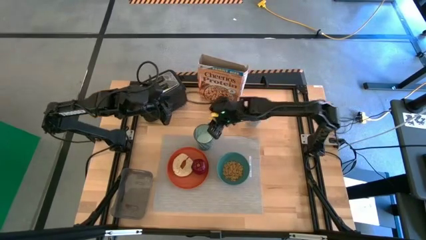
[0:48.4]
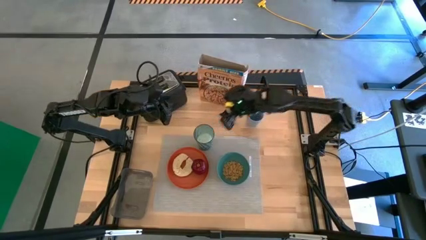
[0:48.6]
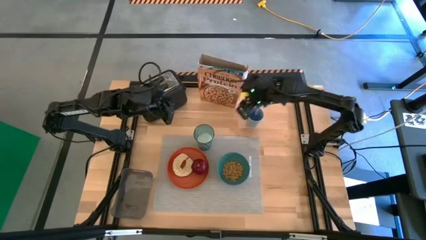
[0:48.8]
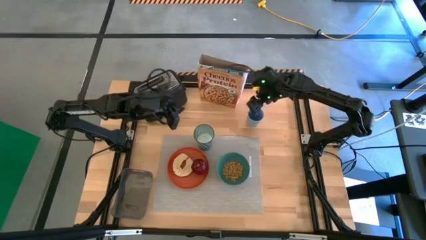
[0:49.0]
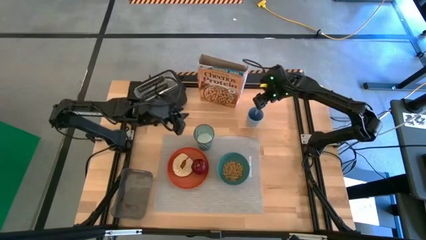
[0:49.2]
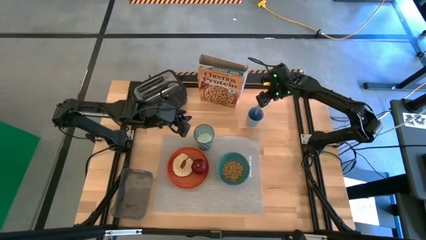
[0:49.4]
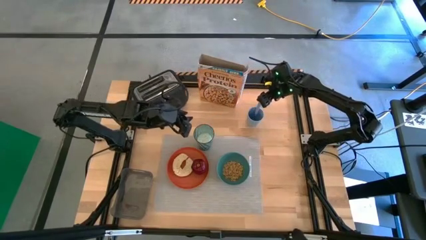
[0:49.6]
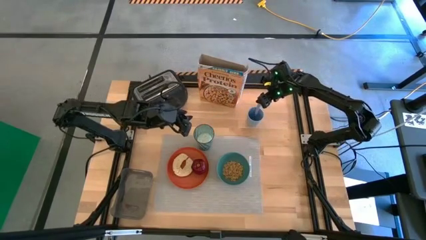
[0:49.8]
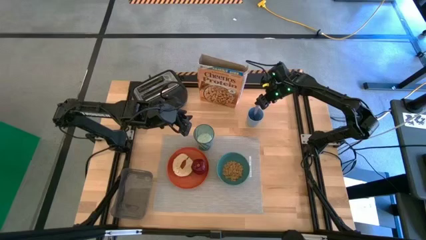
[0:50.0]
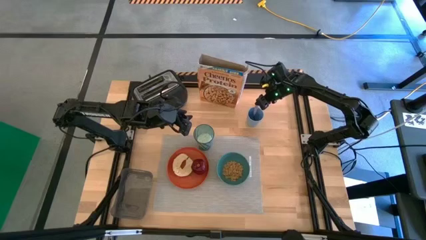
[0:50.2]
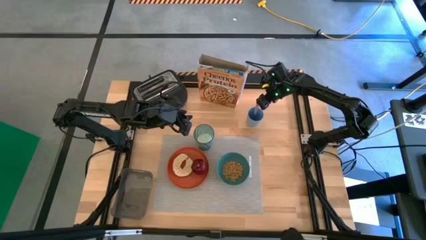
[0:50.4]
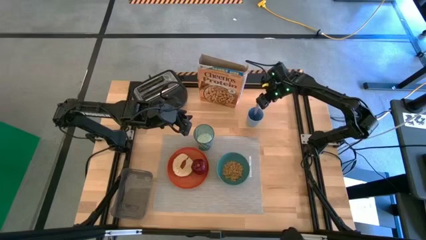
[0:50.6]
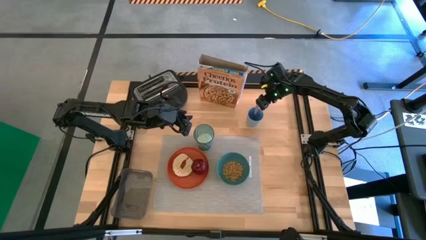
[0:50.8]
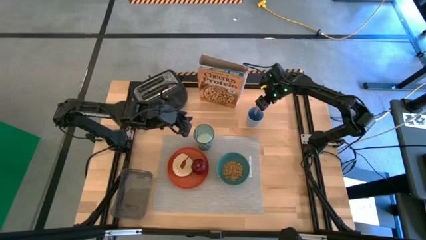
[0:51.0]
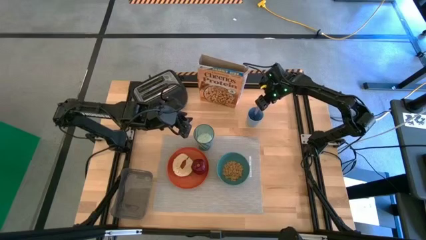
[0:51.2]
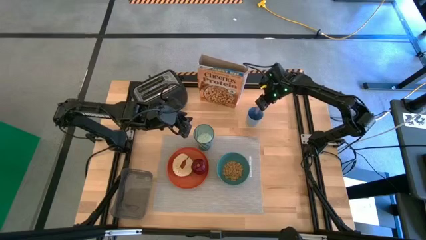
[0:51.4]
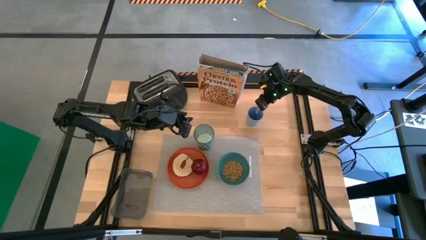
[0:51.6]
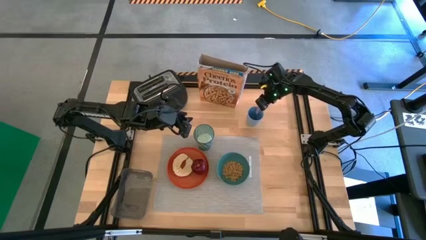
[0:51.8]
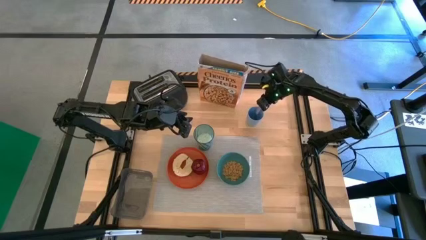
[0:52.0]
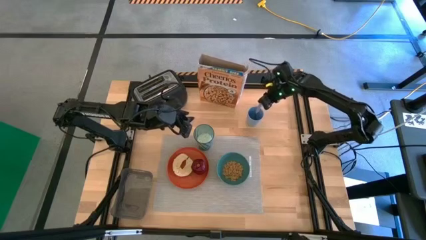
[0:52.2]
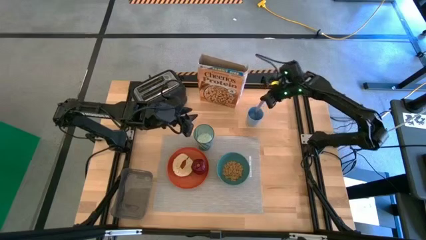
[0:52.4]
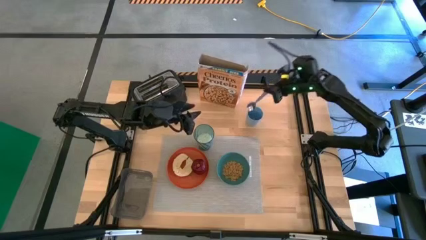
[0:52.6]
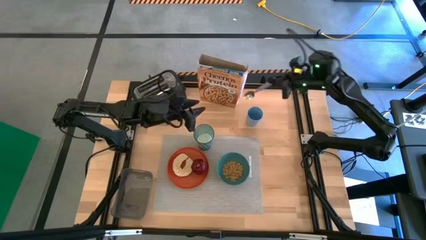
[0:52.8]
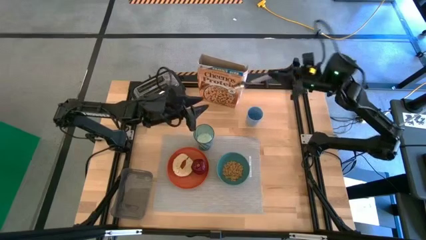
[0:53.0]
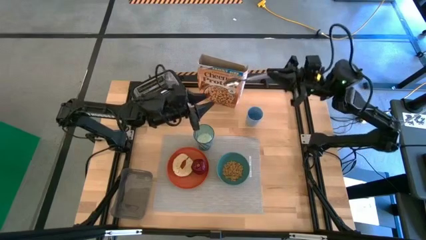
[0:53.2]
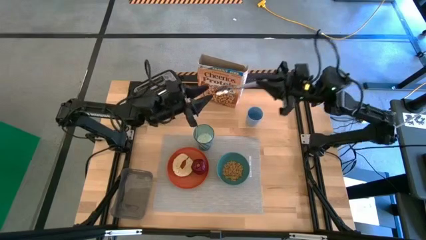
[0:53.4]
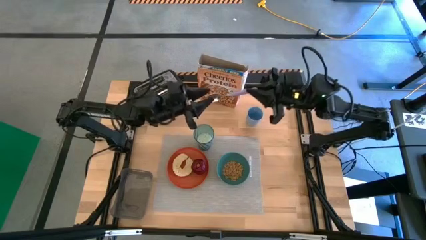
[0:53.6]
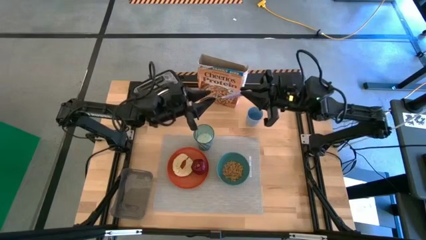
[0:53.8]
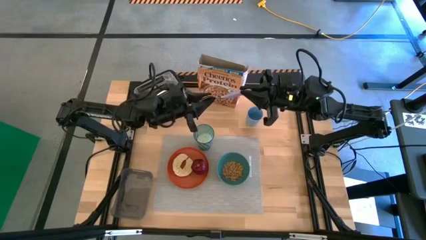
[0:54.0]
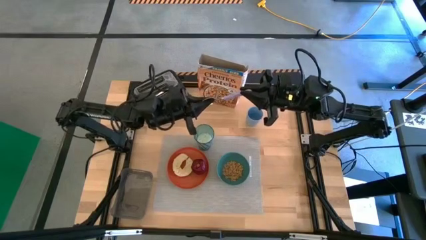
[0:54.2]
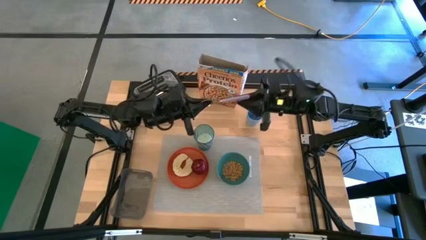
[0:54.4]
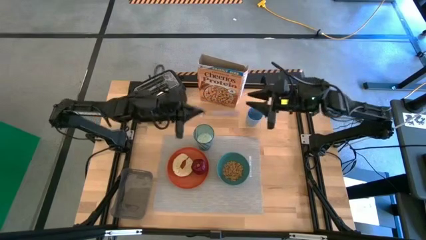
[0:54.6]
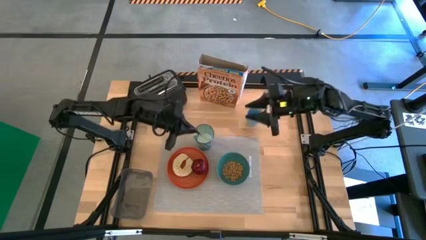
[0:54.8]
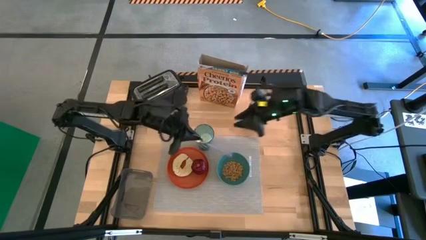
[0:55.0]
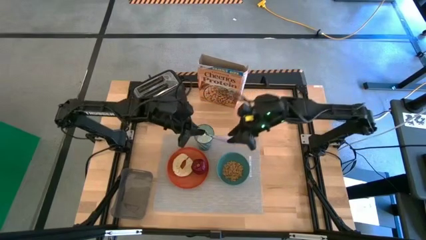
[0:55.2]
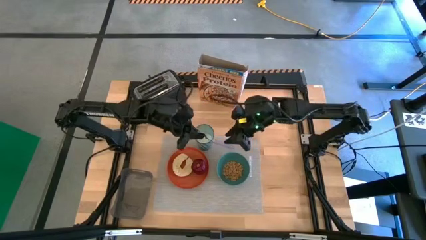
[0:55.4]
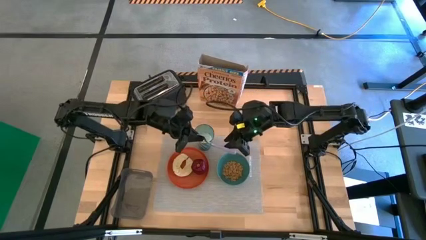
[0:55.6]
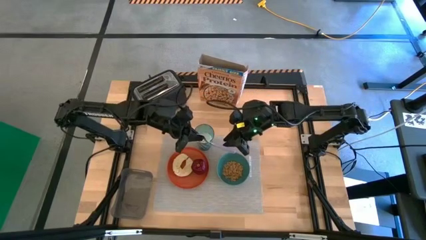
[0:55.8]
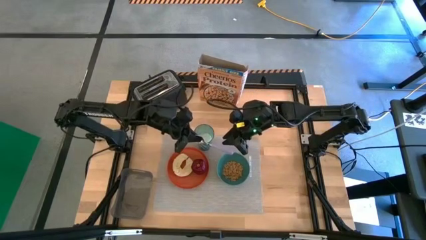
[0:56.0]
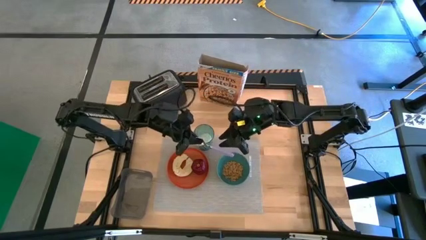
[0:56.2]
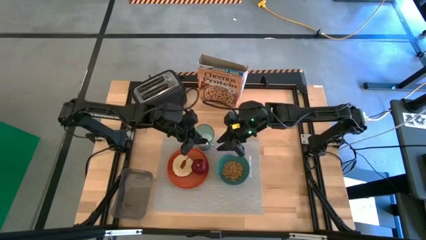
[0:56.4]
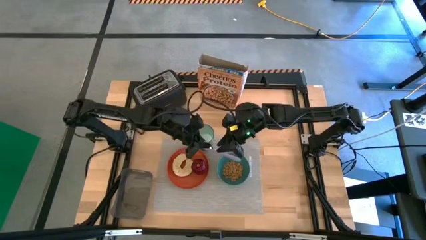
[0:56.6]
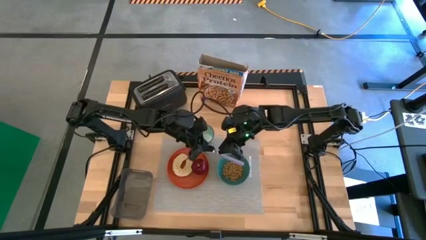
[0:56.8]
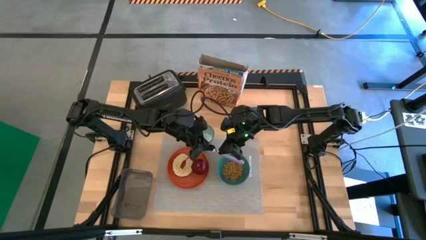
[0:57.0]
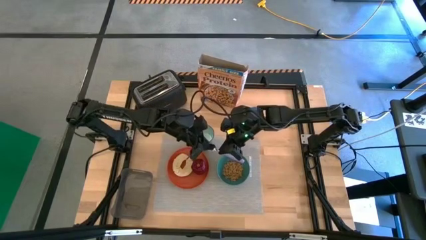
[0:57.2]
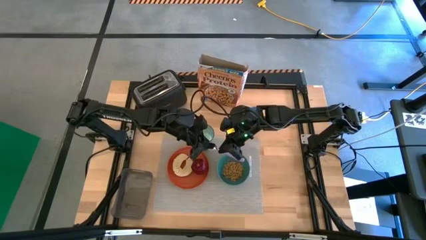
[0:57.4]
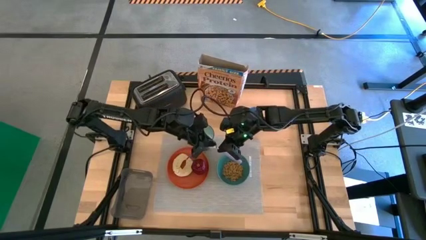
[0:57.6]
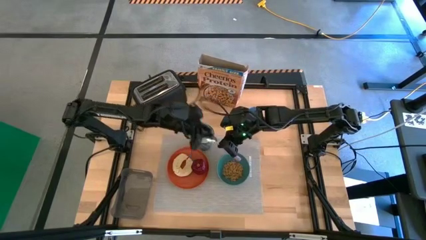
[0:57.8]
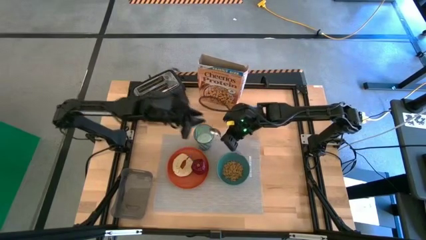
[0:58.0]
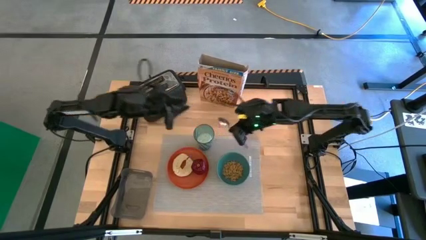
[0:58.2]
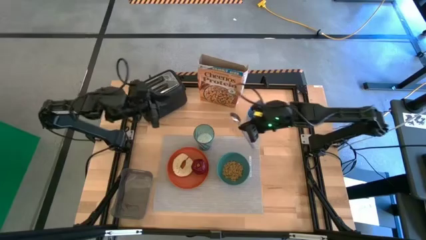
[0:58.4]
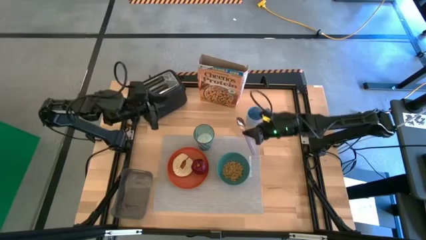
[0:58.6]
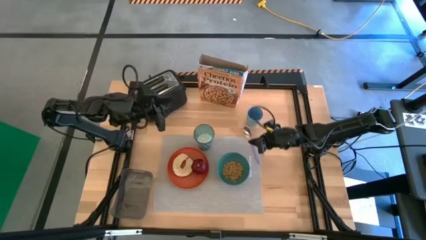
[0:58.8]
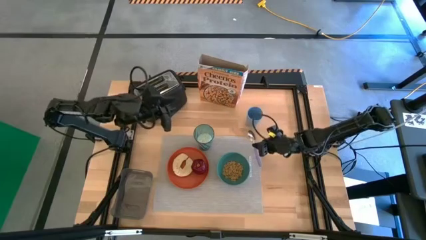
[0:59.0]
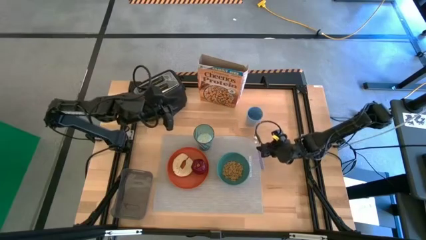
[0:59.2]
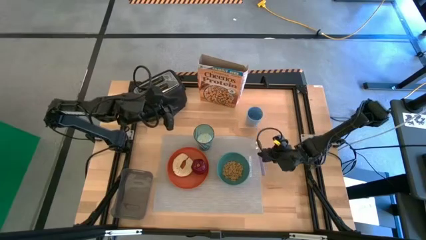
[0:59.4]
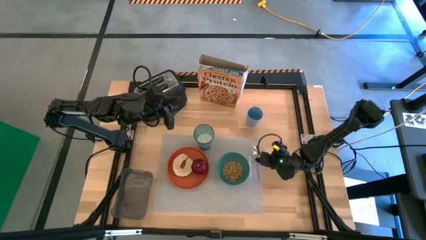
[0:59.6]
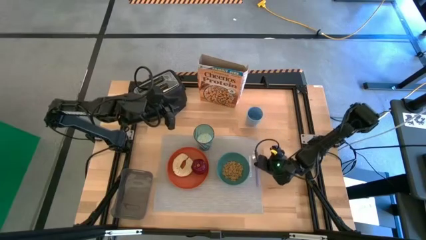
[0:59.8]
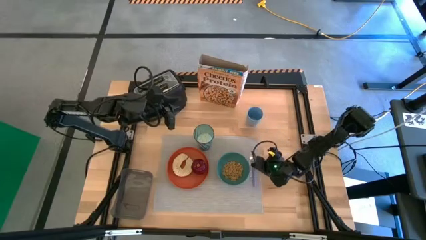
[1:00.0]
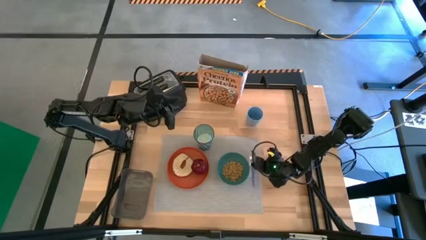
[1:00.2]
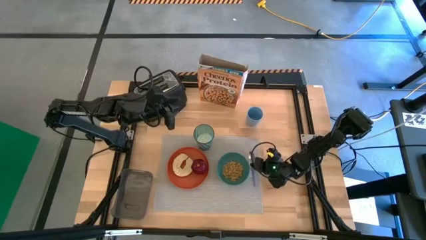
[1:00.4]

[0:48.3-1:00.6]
Task: Arrange a breakfast setting
Put the violet spoon on the gray placemat to the right of the green bowl

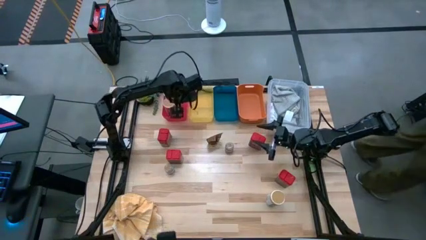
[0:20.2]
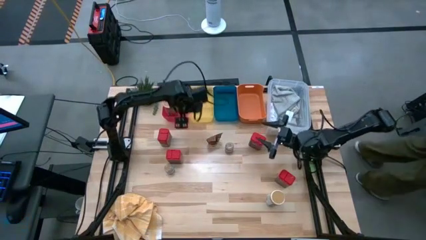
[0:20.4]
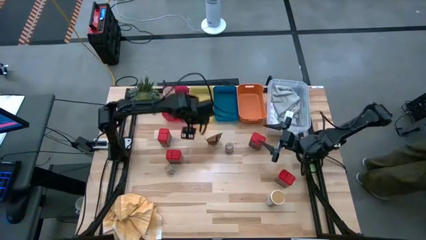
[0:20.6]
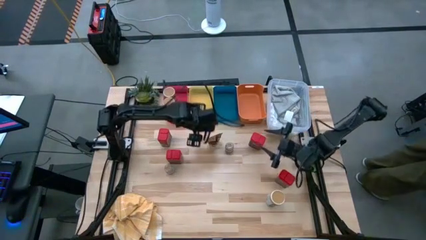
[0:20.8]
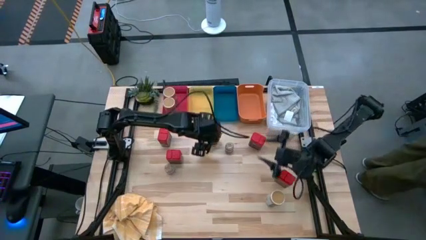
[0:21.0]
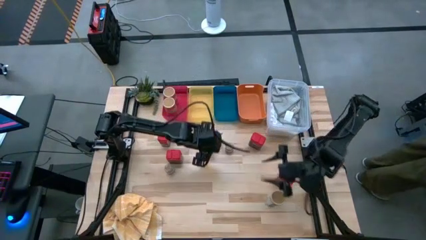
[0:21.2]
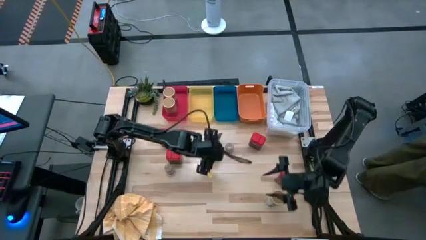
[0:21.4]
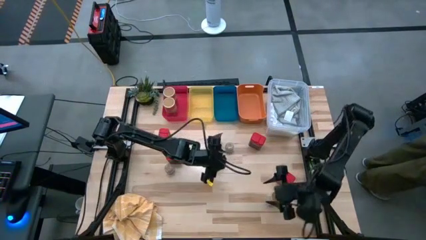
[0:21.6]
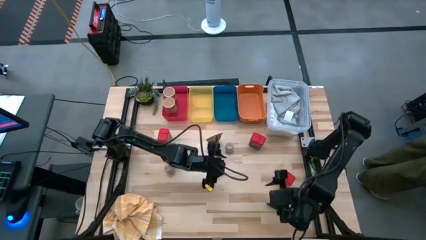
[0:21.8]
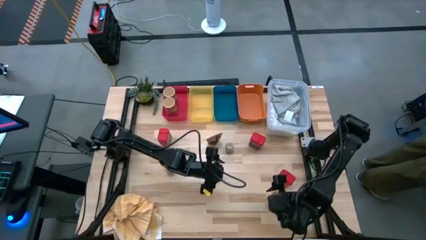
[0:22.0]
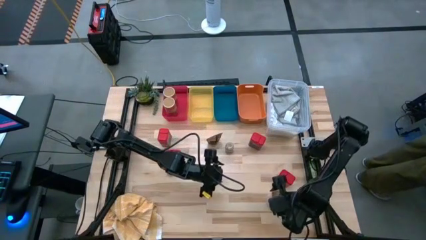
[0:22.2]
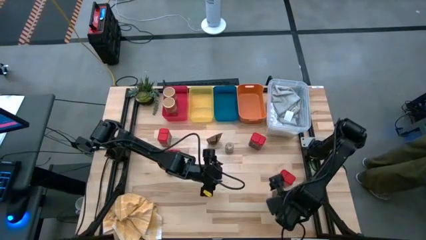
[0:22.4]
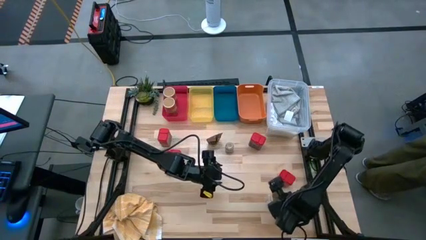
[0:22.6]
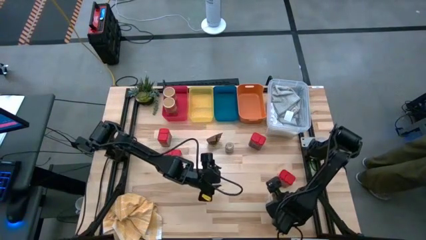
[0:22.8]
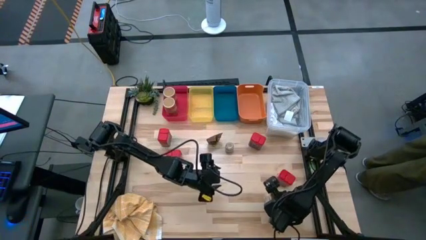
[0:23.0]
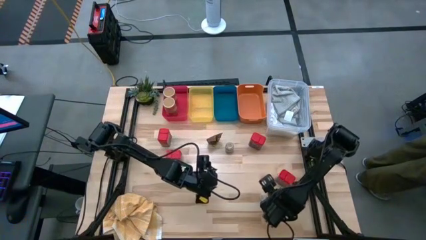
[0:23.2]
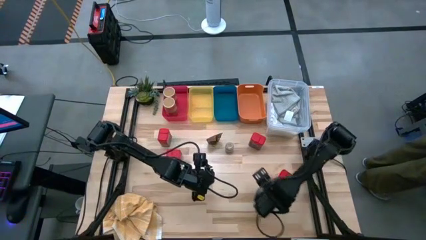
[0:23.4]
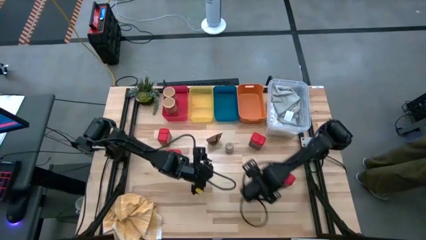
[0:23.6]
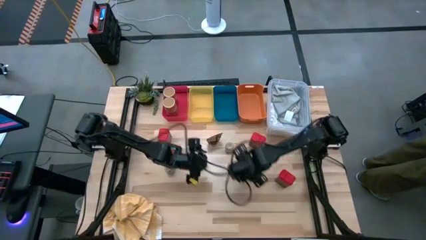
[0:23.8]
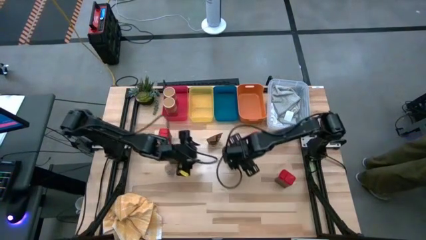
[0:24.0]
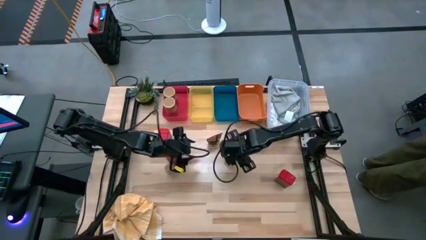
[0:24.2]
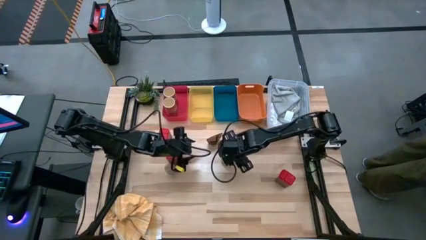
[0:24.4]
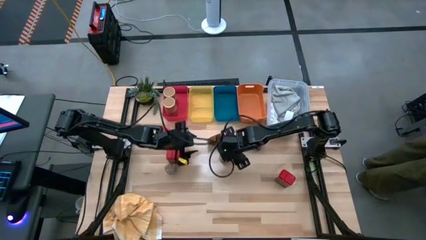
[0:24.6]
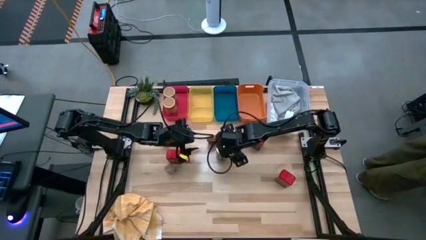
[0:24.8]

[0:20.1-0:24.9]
Task: Sort spices by type
Move the gold spice bottle to the center of the table
